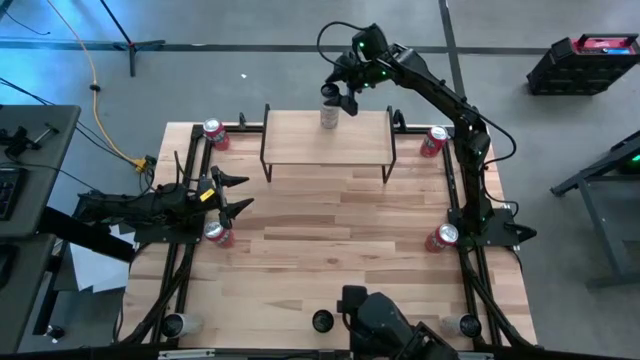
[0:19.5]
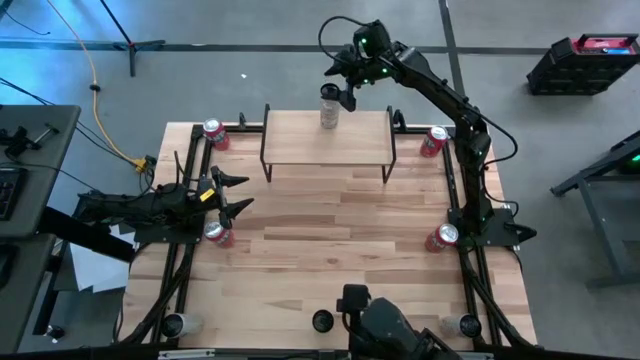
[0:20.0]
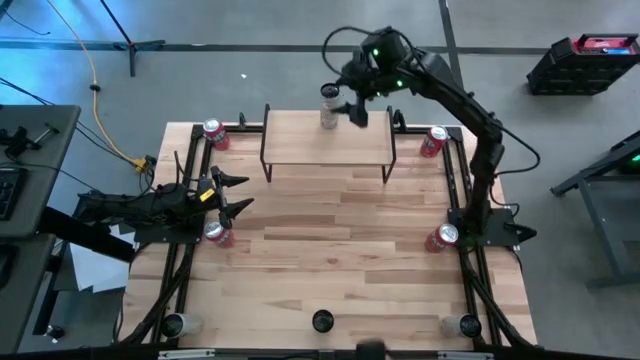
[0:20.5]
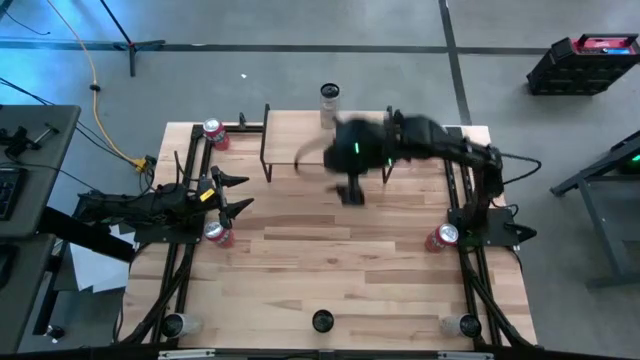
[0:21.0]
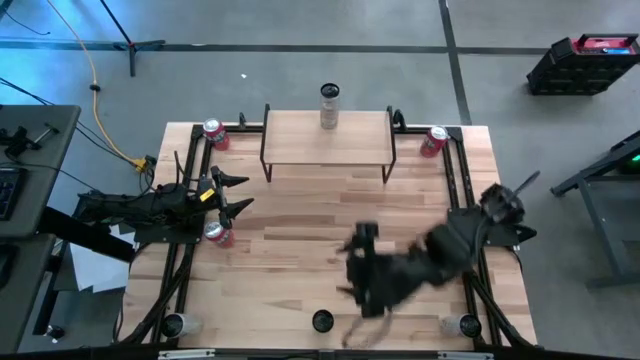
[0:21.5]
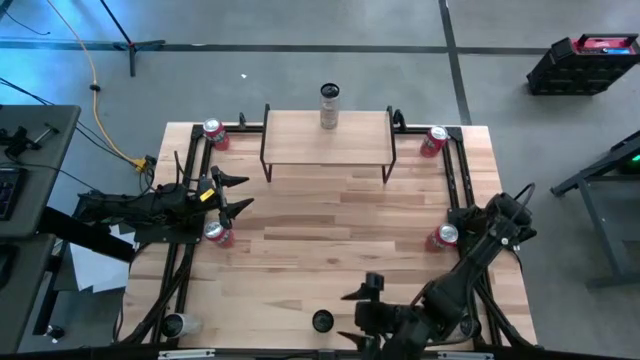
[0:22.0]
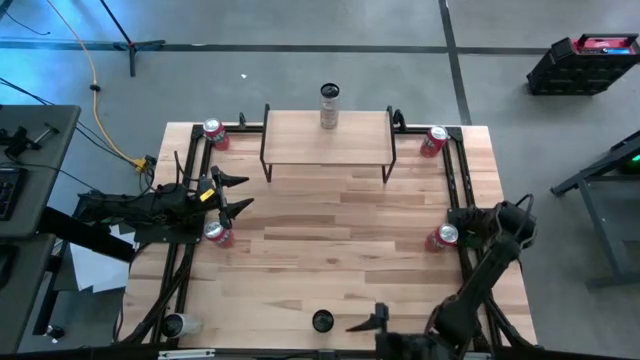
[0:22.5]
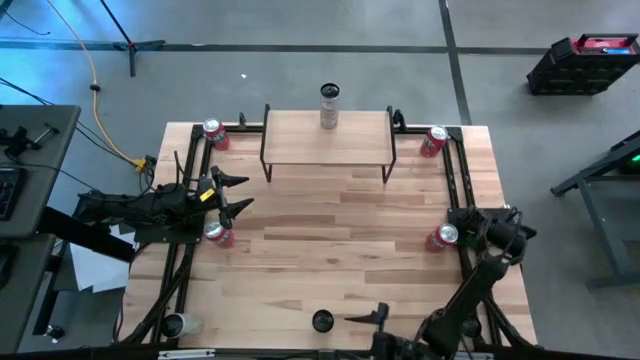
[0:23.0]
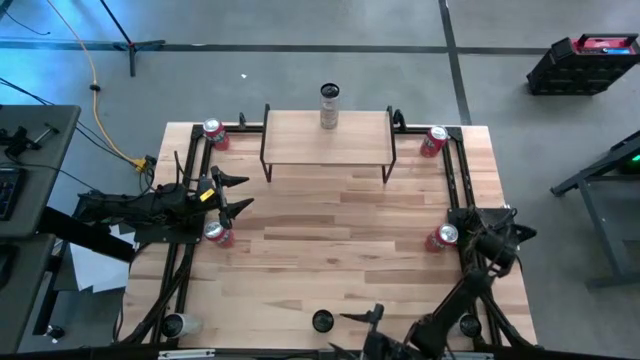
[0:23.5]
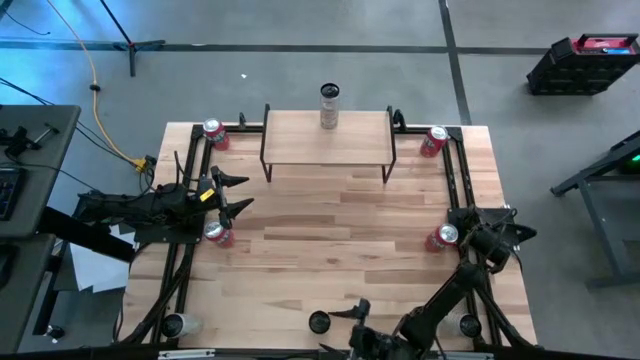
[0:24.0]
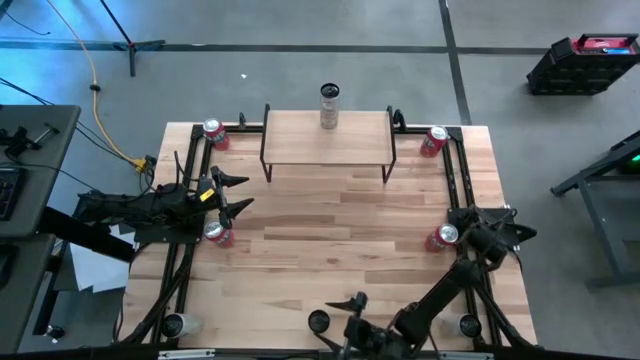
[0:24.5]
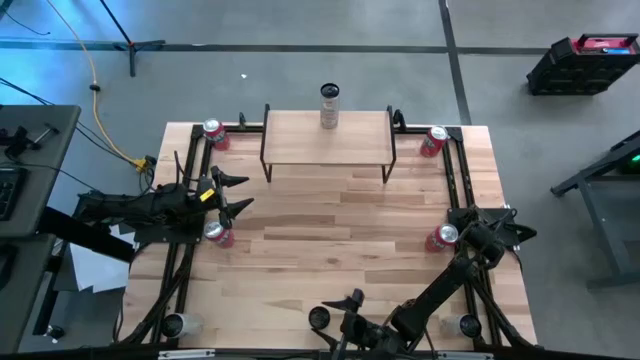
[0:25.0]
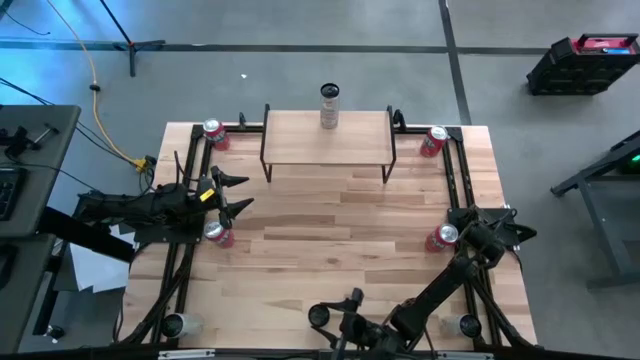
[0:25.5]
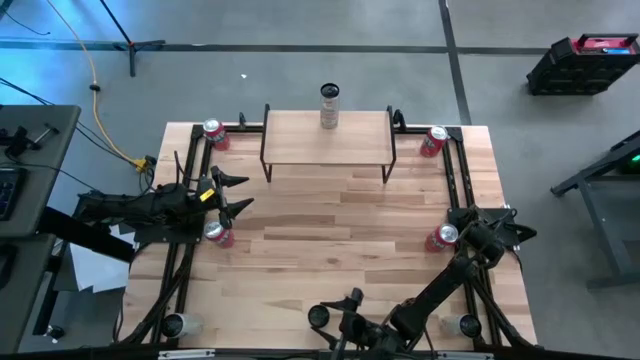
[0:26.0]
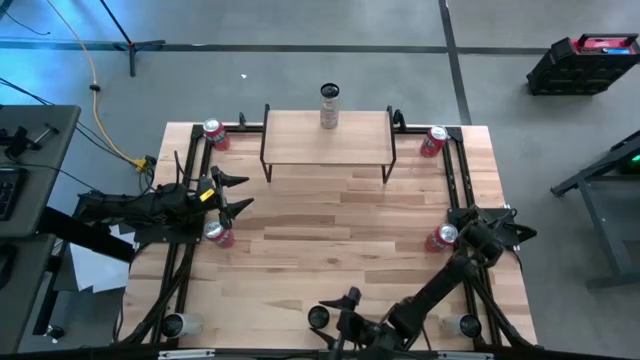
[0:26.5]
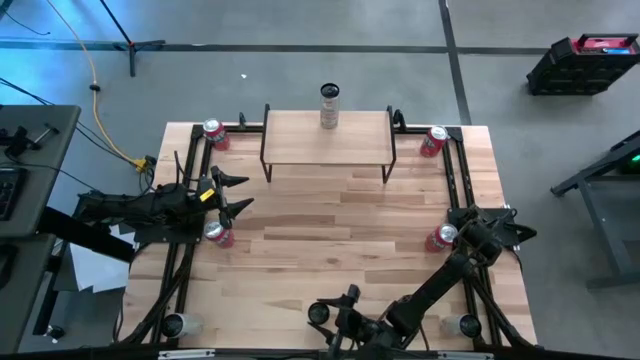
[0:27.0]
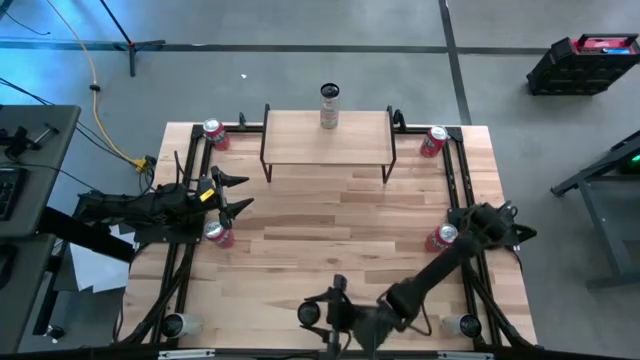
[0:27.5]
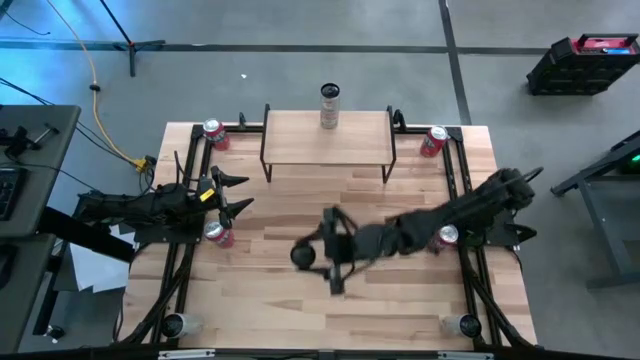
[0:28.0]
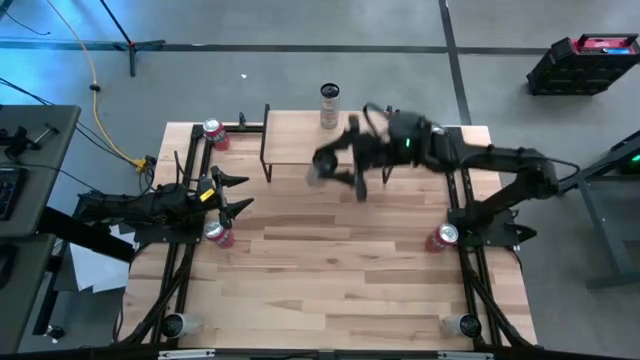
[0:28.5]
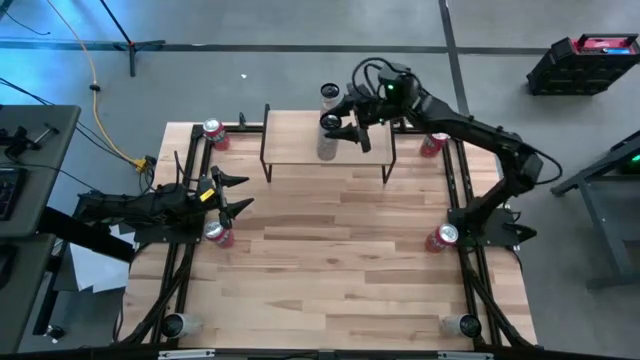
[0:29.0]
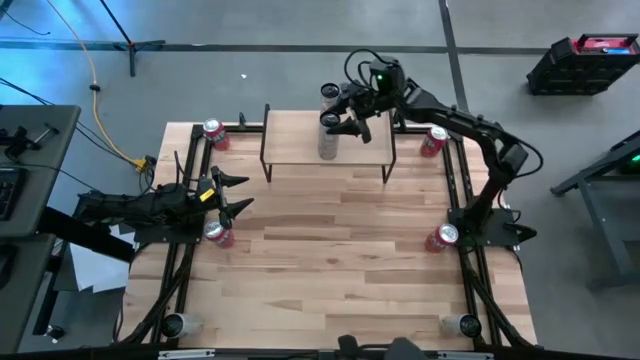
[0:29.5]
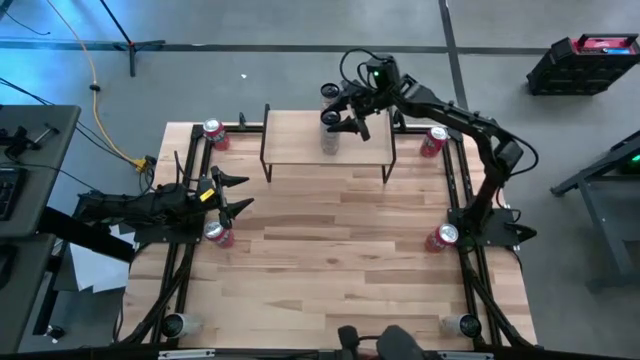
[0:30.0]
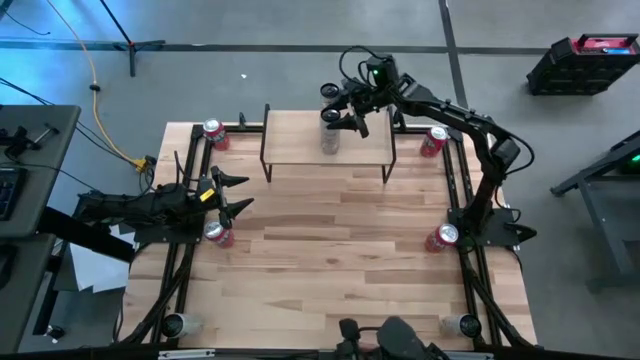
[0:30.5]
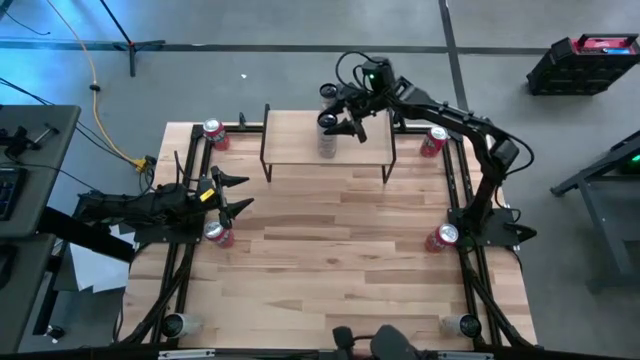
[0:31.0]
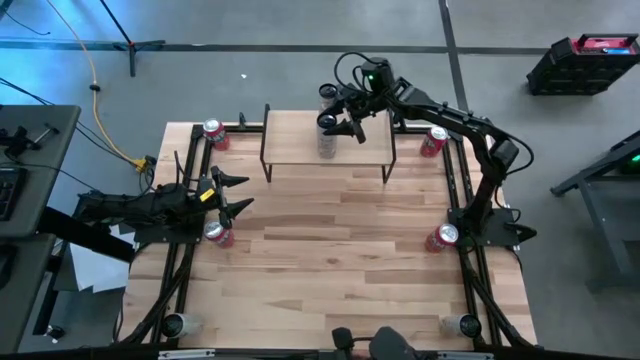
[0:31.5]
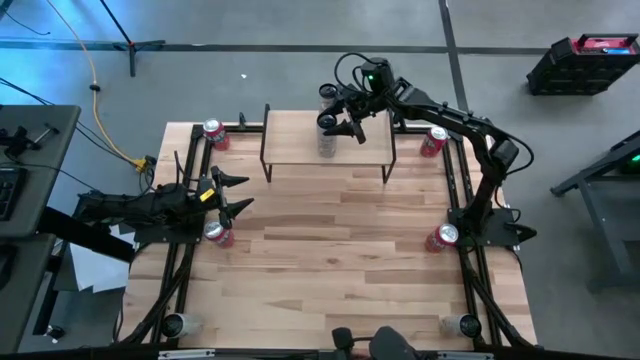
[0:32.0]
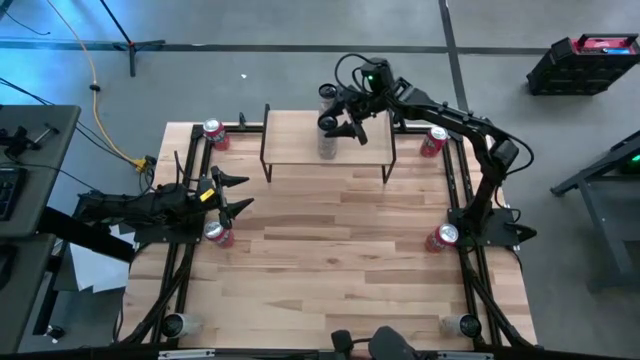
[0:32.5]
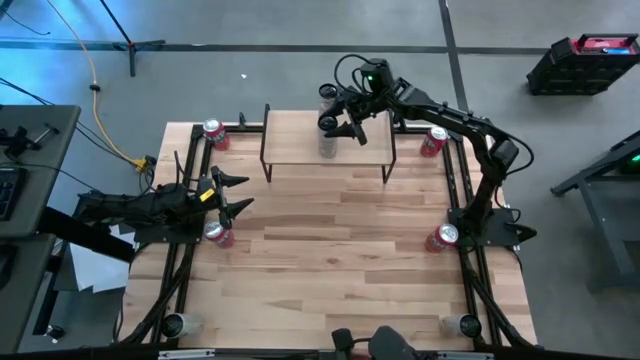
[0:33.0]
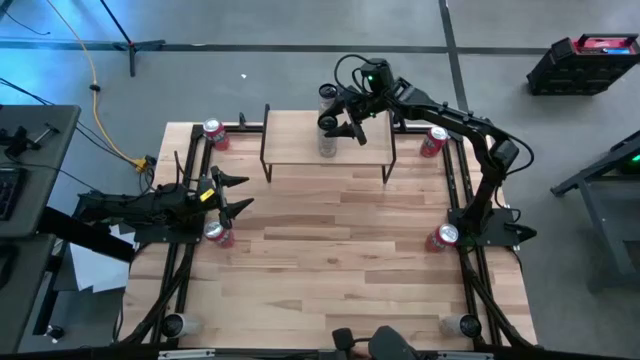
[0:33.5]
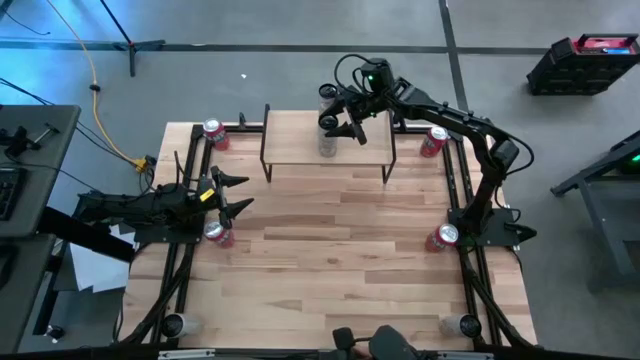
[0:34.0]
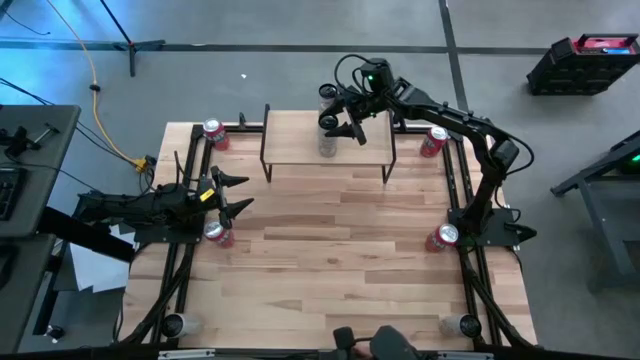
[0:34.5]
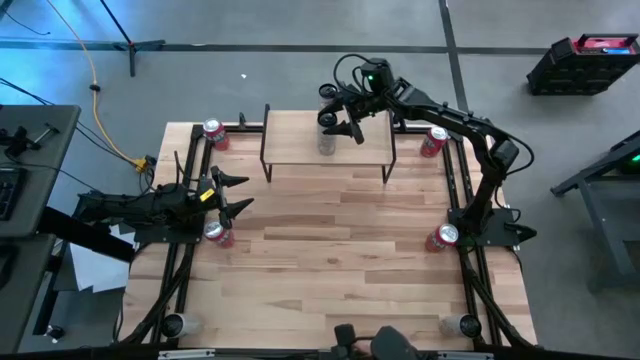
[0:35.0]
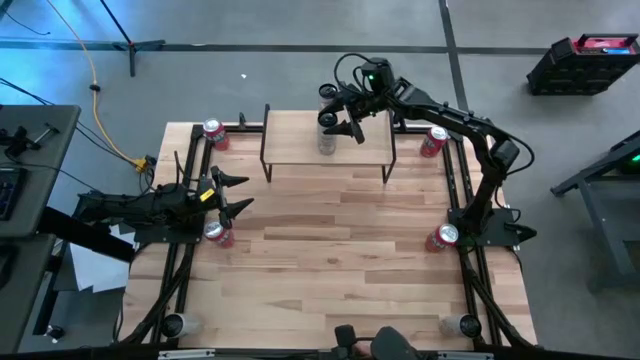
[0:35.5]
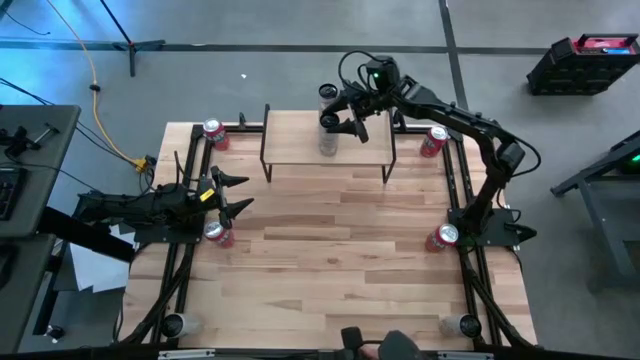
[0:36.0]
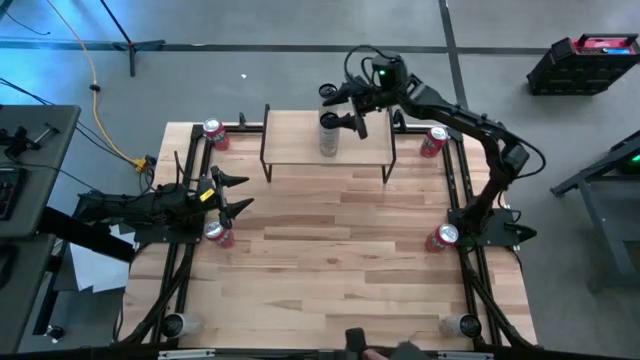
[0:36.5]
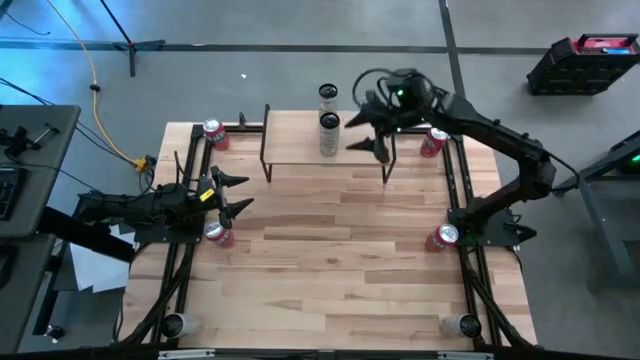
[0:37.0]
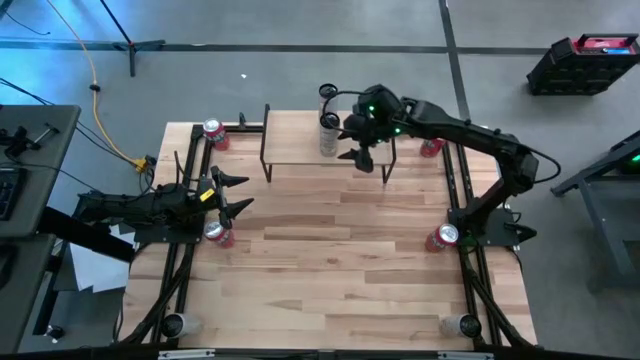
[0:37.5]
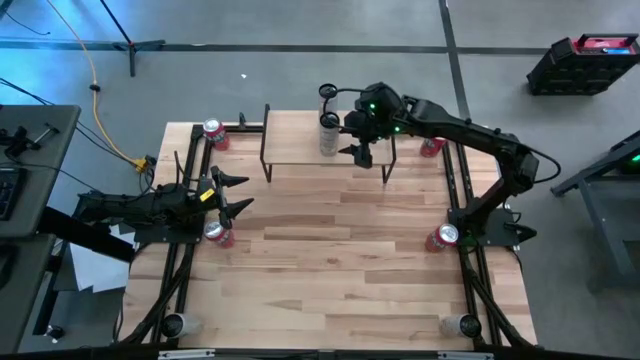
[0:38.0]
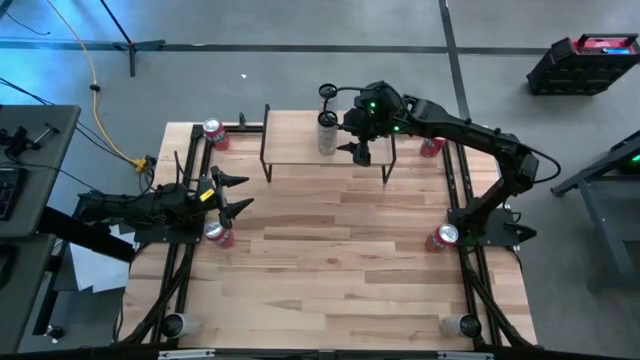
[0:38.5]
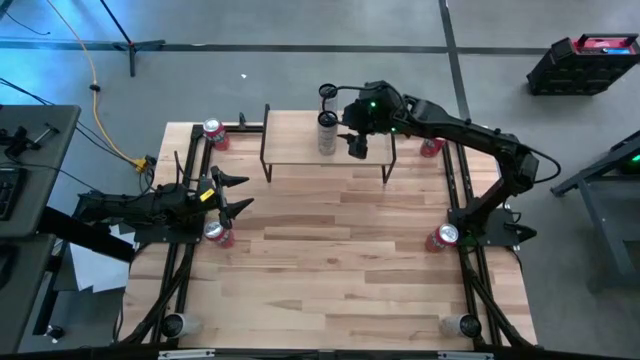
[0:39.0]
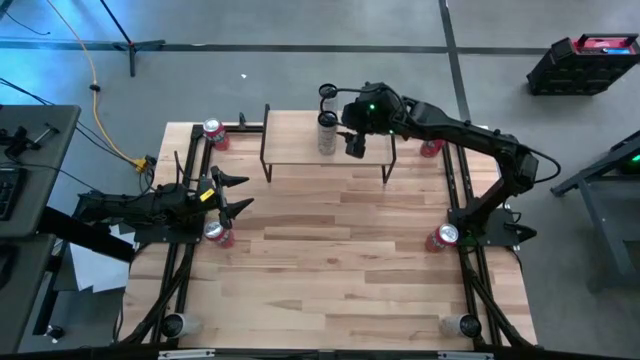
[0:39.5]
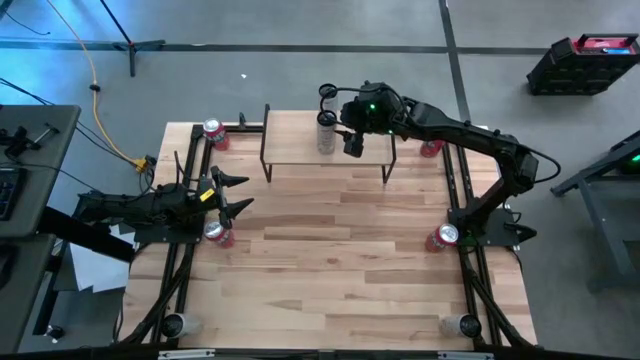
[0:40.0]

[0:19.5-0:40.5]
Task: Place canned beverage on shelf
Put the middle white soda can aligned with the other white soda can on the shelf
